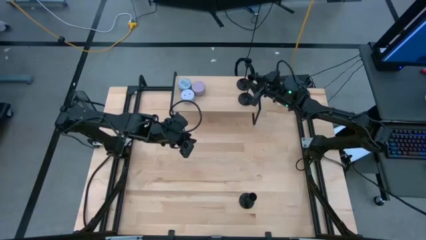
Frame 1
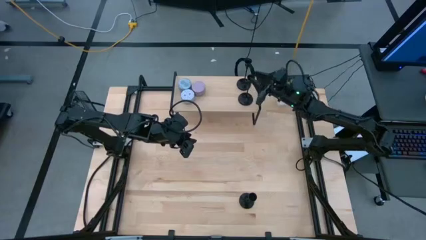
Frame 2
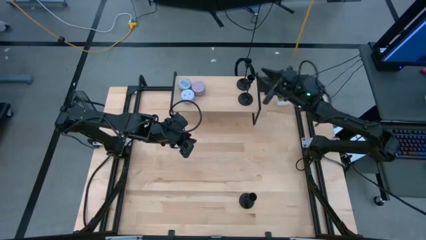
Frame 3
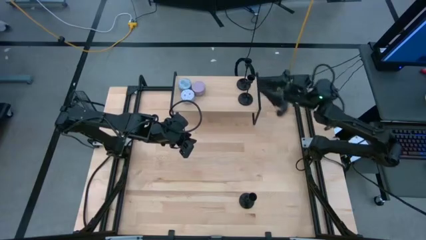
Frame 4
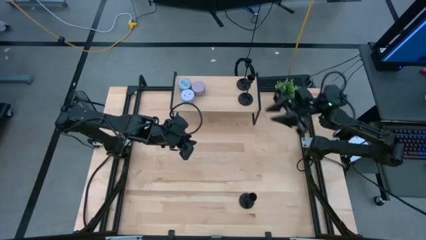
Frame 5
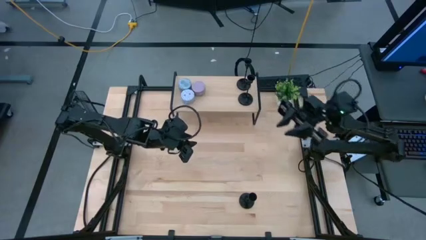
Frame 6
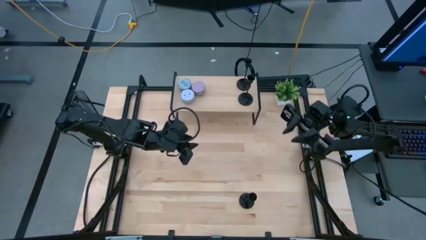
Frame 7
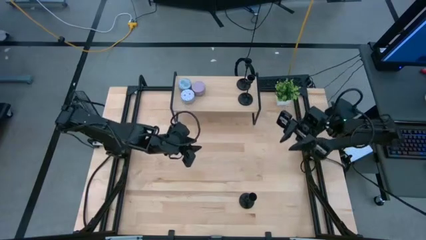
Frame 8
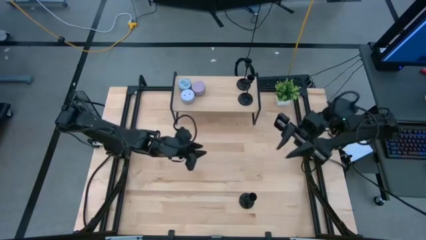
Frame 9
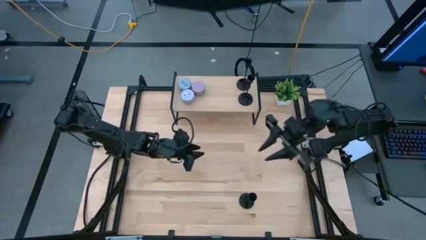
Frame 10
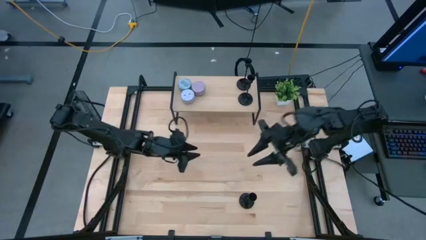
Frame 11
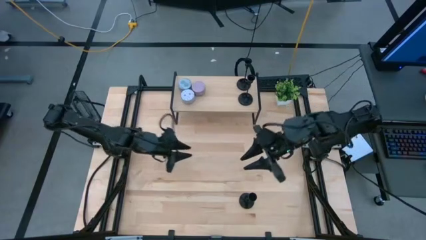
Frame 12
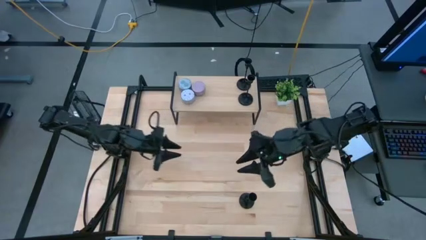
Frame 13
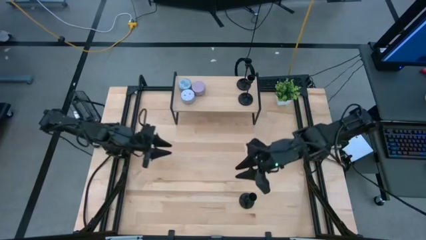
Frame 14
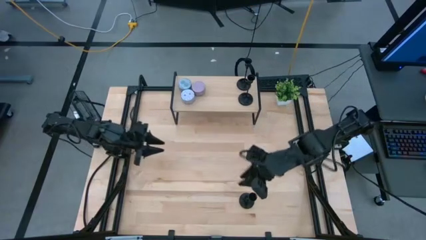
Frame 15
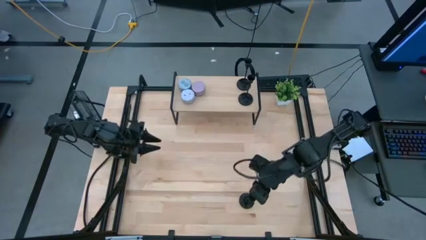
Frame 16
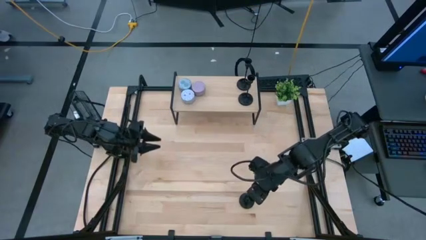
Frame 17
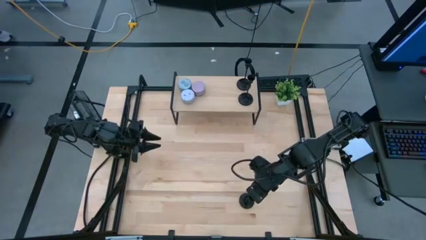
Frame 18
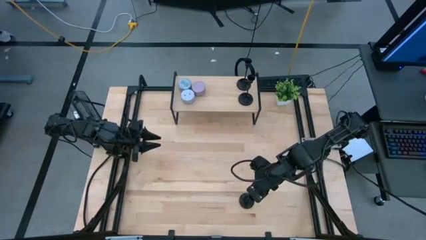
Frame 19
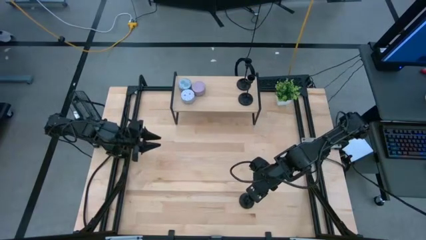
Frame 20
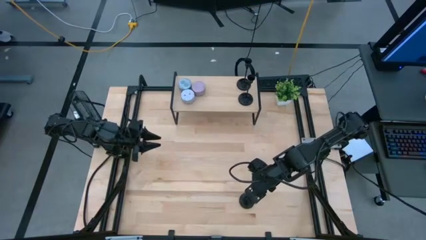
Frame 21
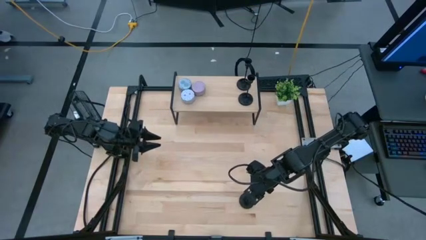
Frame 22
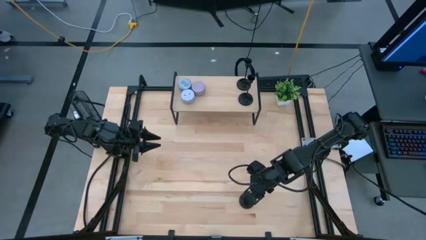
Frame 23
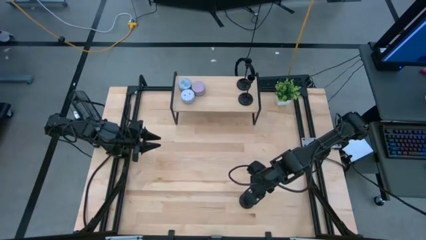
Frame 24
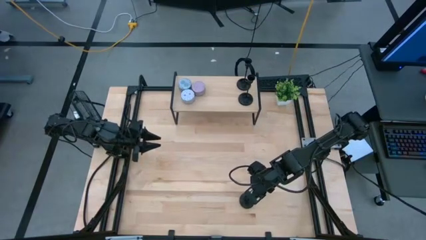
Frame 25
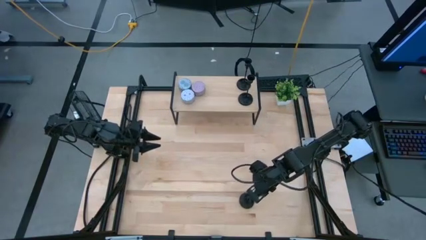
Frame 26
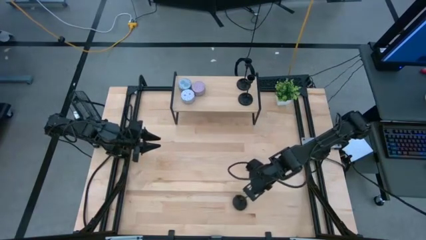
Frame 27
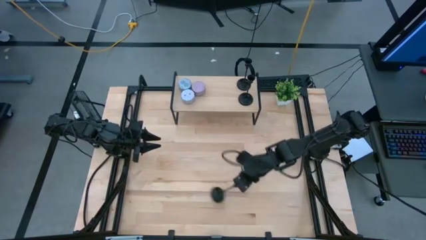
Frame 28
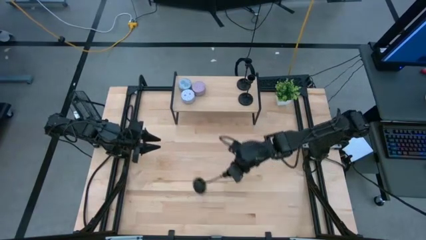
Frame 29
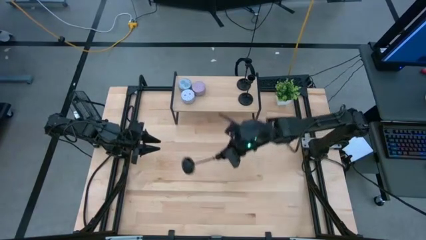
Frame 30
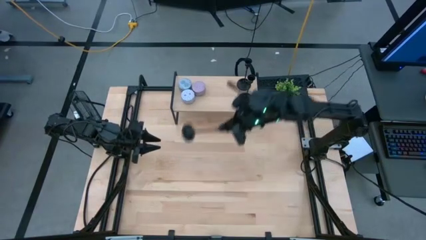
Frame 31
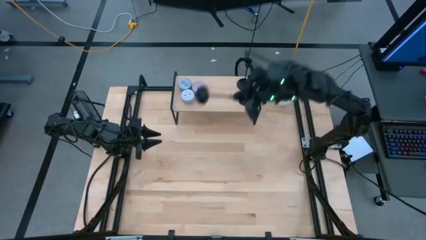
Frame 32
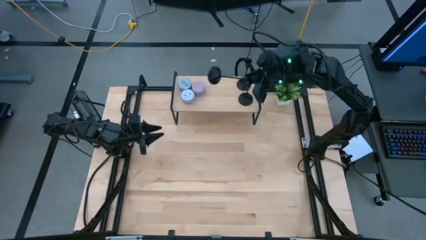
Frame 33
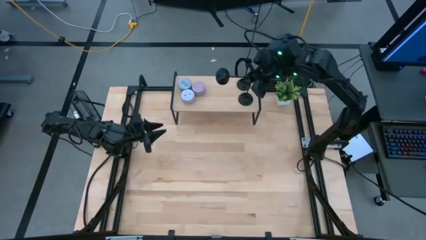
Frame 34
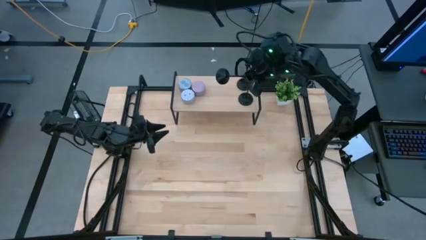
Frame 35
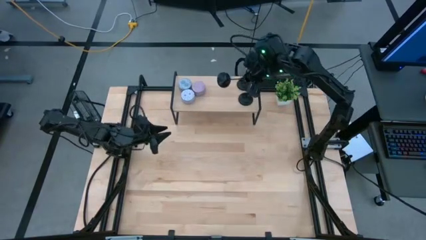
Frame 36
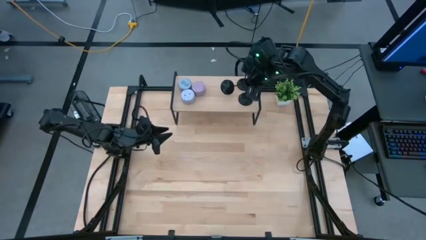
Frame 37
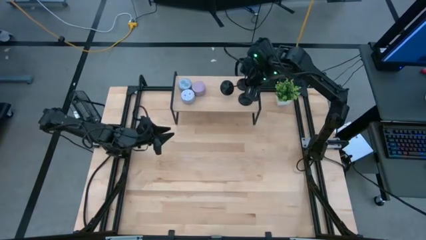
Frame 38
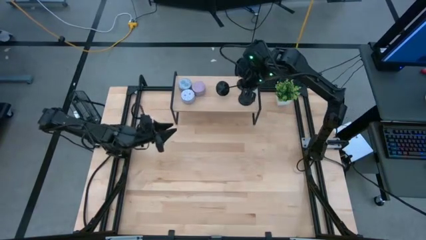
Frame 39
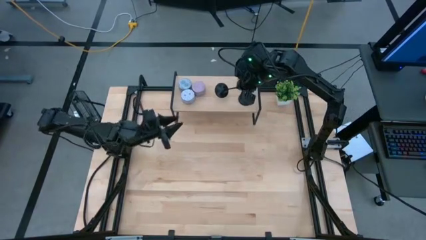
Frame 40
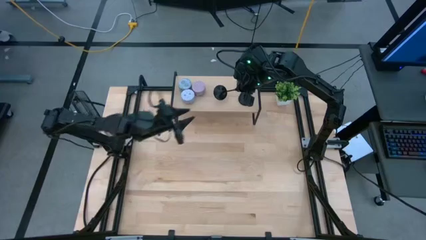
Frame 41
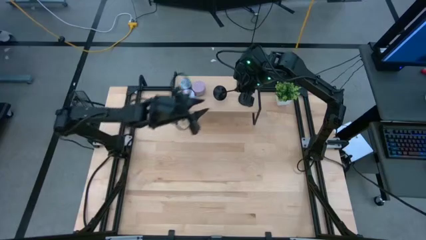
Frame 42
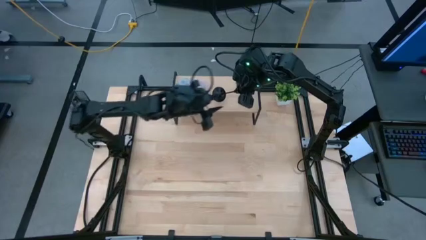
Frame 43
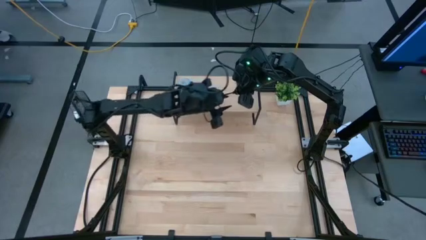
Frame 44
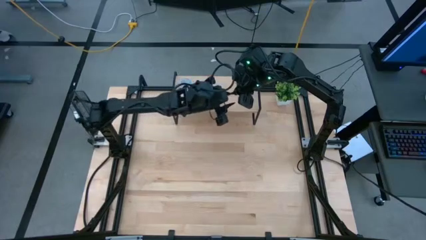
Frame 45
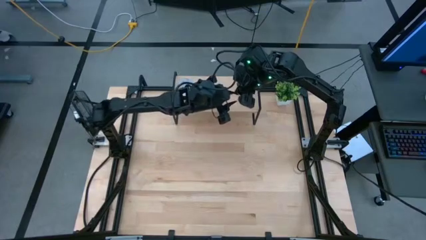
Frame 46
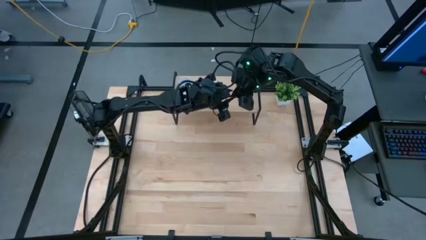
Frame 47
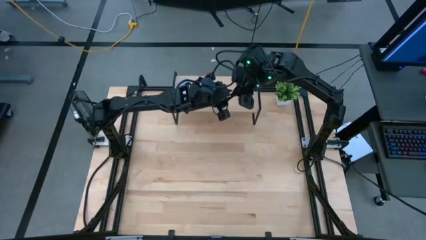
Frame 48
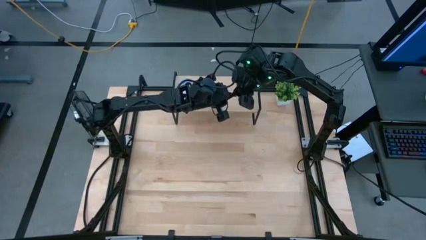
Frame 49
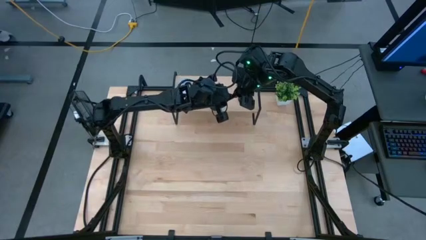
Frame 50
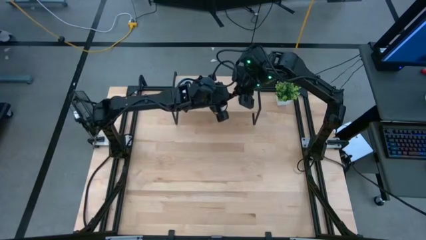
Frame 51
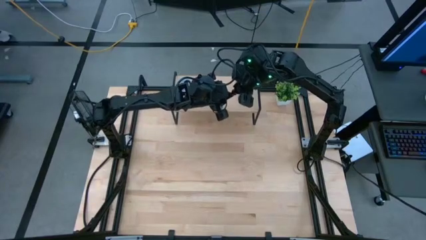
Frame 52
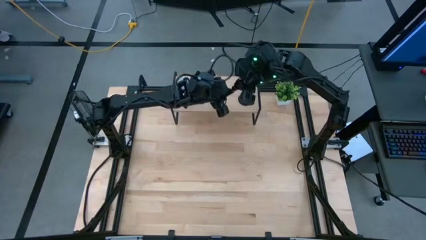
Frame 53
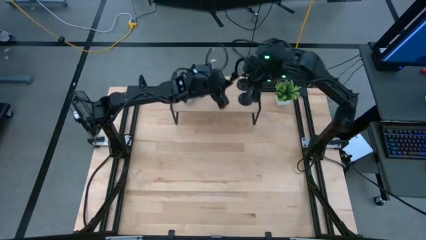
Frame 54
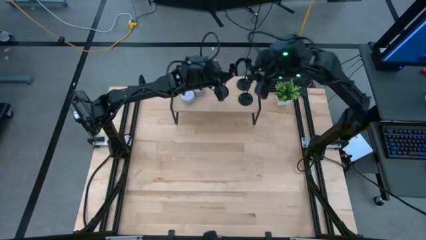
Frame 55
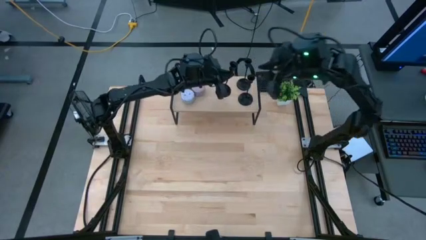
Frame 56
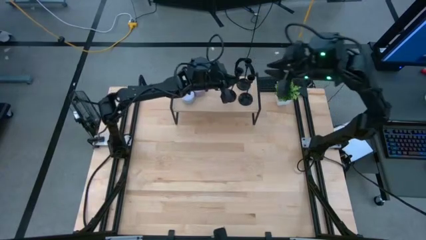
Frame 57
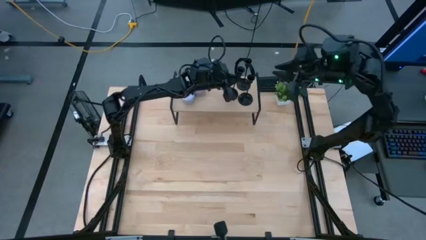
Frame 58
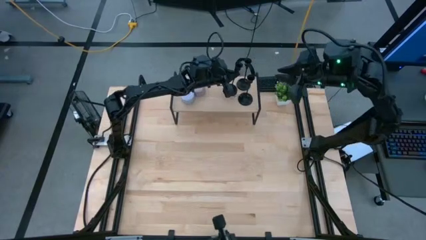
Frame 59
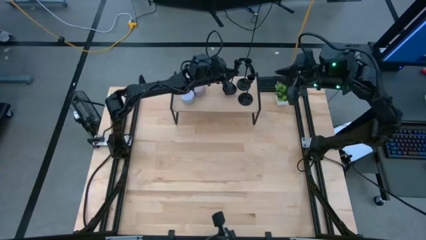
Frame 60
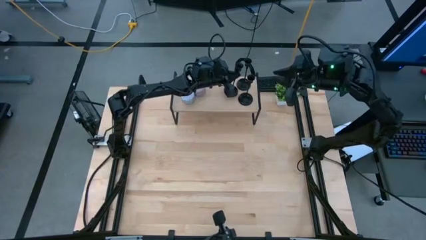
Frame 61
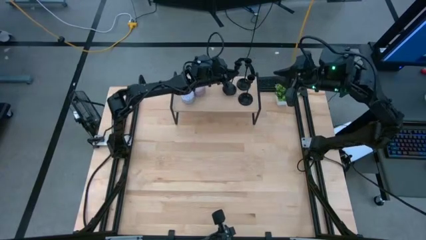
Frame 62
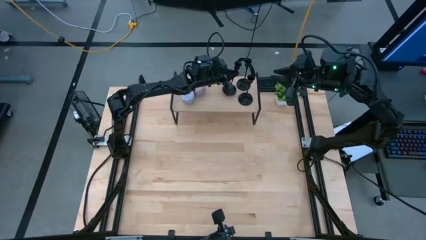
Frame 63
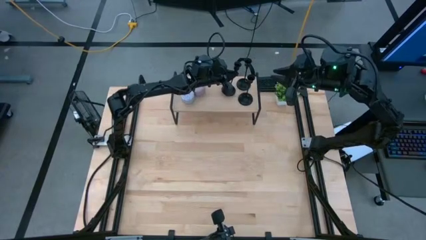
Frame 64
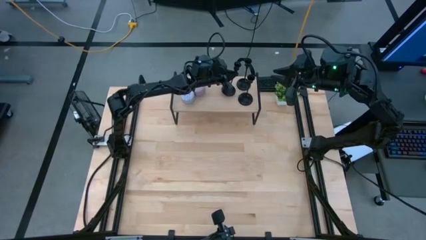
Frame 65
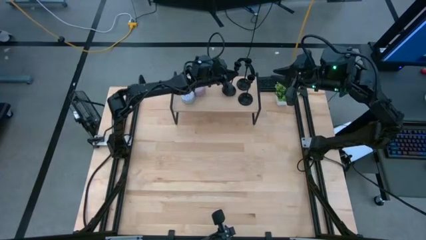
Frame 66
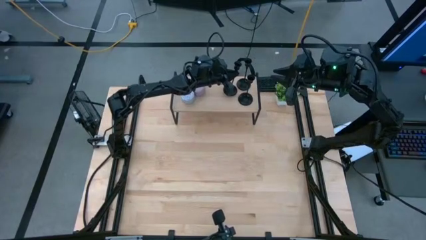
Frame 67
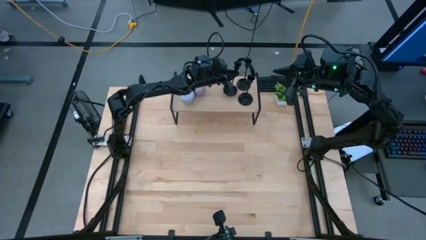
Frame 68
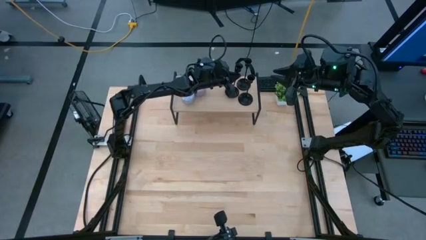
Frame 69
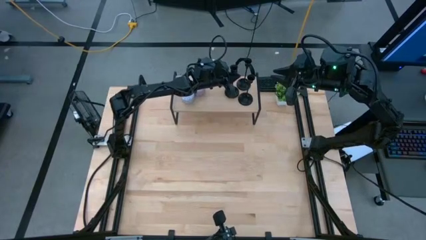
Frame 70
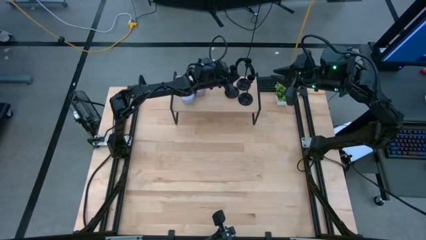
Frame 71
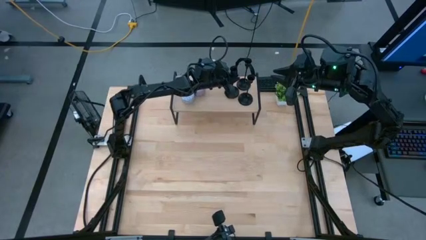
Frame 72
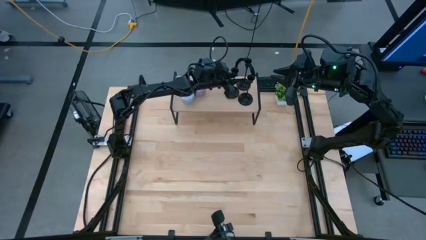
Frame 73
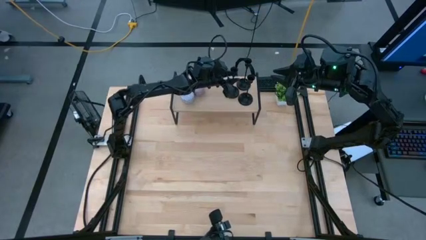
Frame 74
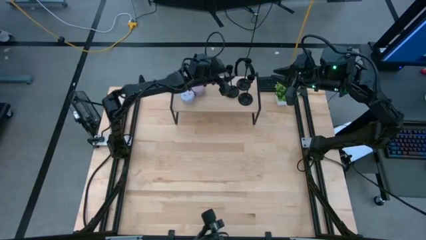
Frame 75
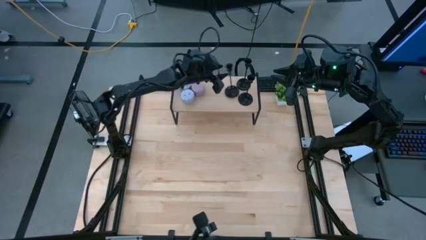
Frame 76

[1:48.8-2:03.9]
Task: Pick & Place candle stick holders
Put the black candle holder on the shelf
